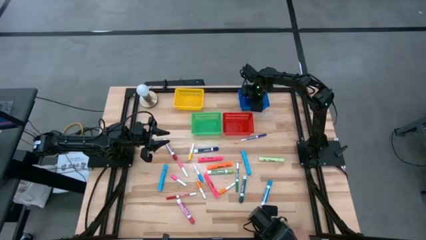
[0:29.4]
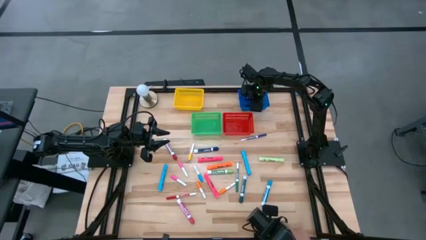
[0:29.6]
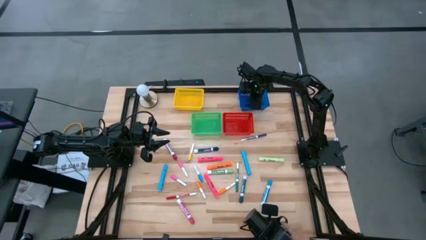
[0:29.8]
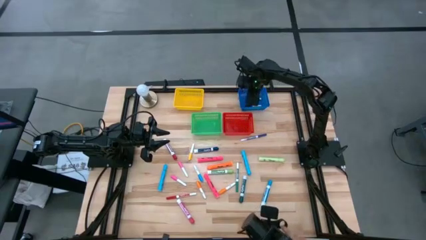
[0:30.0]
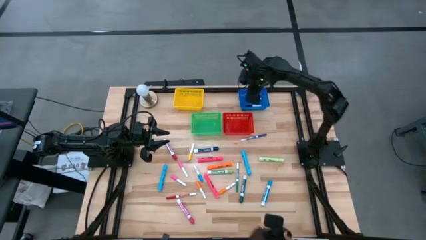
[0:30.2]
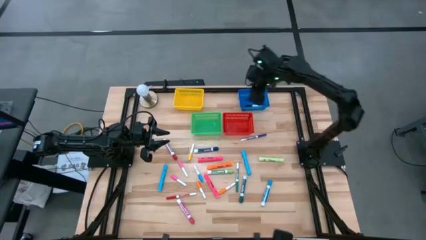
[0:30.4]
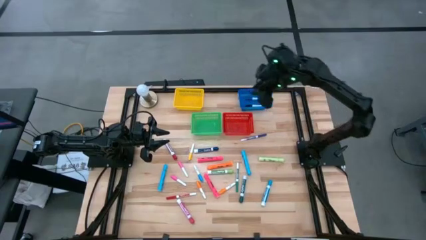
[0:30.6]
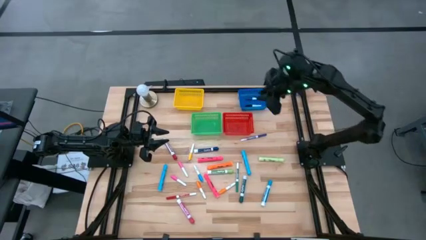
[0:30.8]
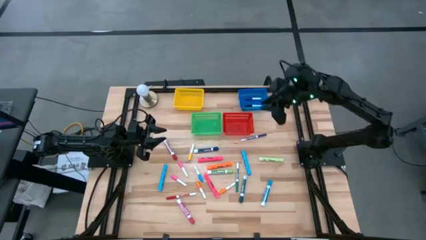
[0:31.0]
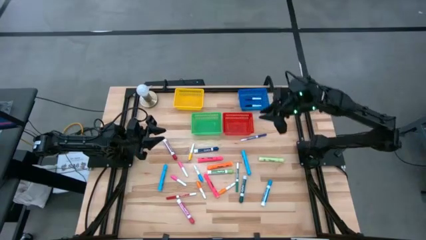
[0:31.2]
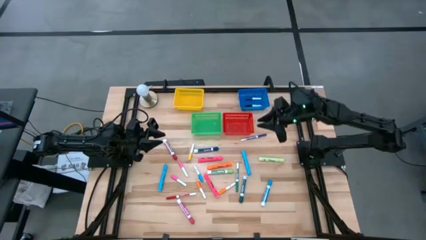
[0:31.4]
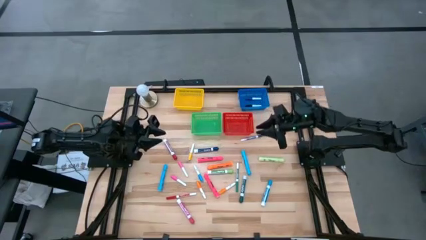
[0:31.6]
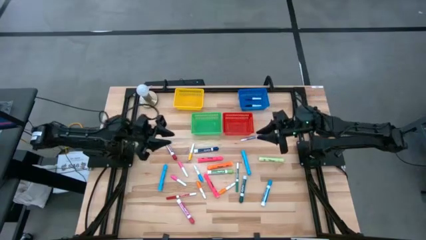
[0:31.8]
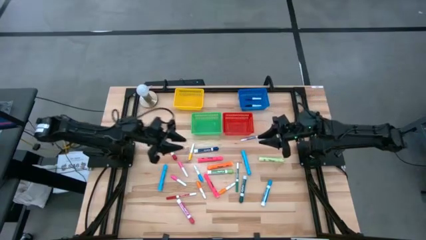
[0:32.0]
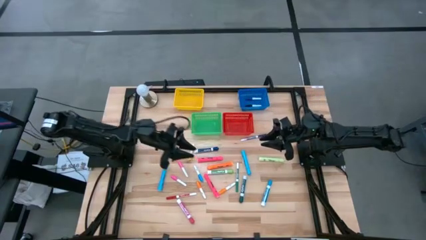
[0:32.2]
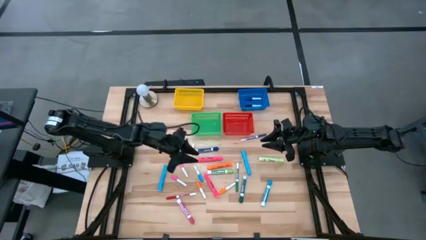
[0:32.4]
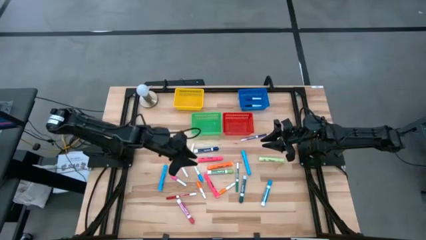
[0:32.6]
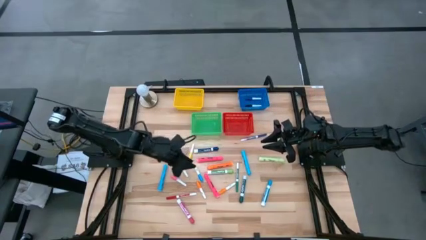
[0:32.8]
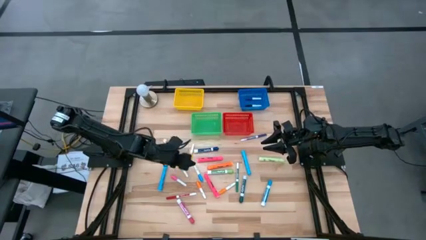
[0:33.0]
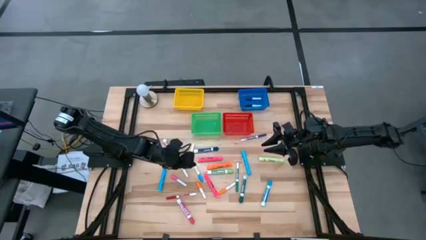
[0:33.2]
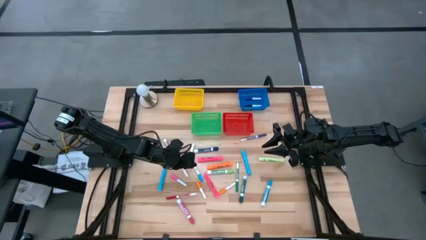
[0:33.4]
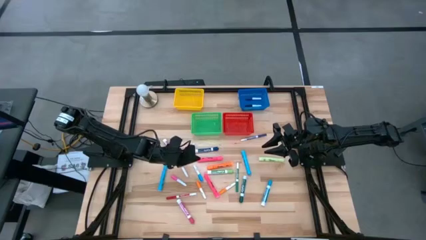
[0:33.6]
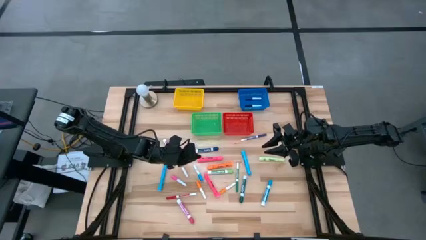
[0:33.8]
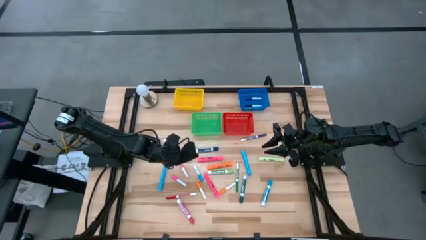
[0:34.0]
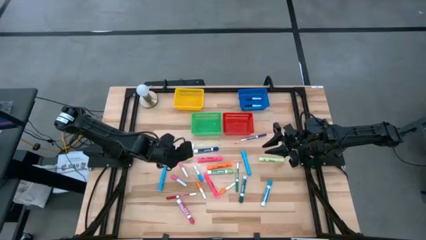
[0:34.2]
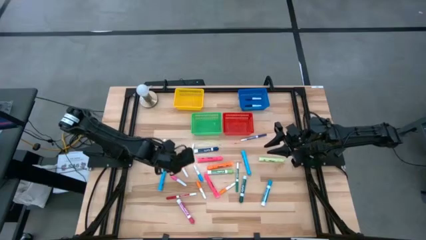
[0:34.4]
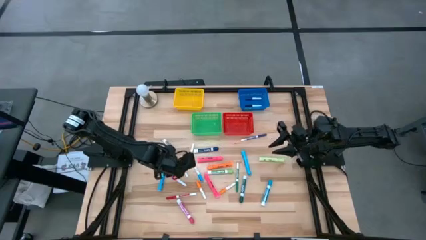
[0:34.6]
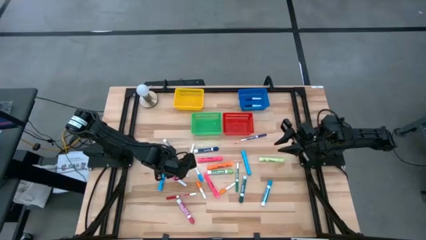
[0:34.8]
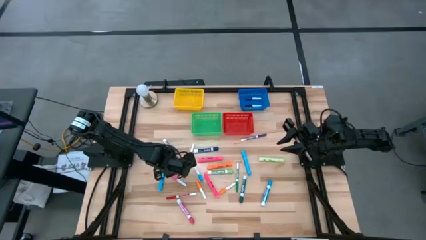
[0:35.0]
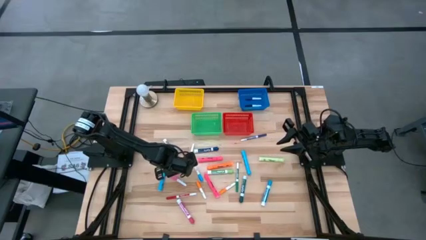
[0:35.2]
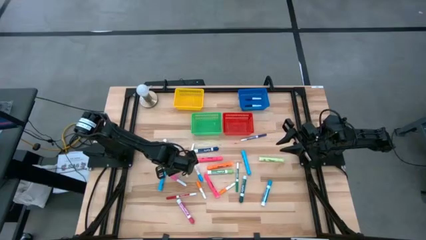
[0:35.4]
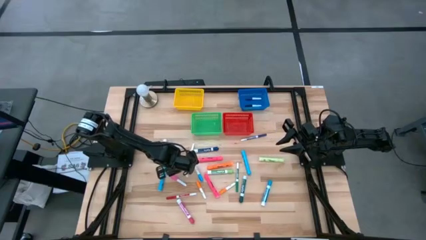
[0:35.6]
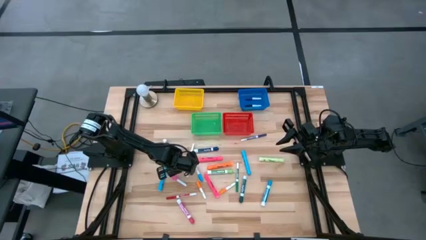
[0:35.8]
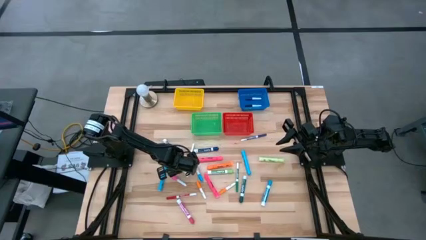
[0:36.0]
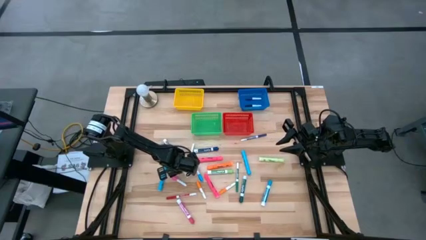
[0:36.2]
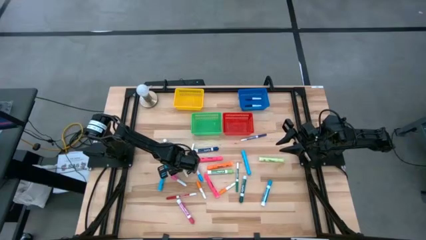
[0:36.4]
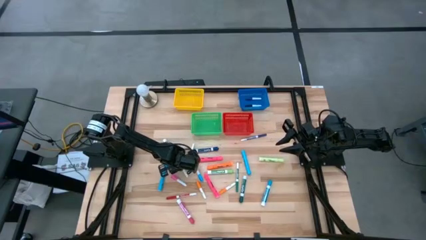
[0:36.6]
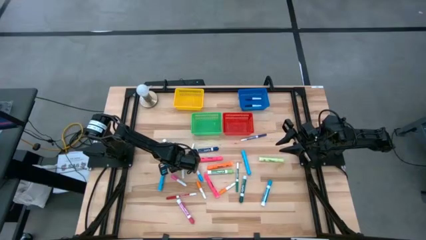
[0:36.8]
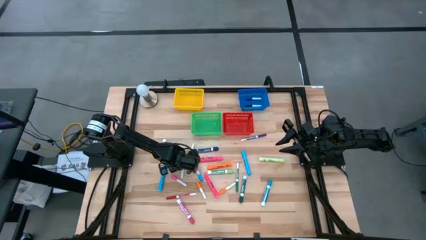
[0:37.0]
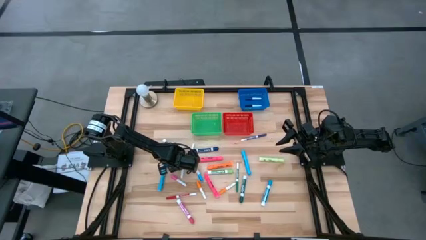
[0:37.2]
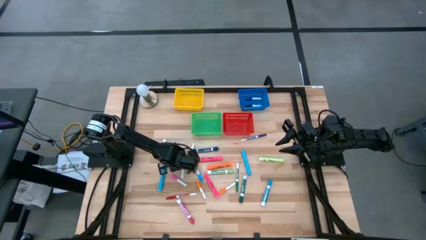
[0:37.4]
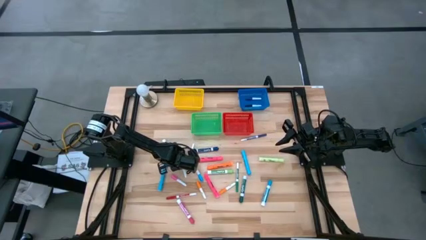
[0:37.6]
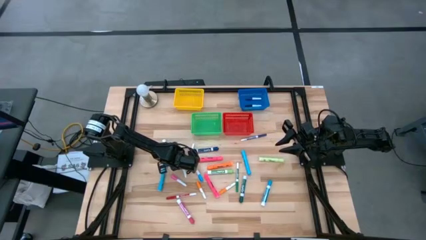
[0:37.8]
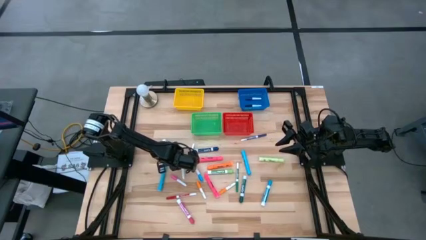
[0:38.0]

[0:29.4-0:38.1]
Task: Pick & Place Markers
Put the pink highlighter into the blue bin

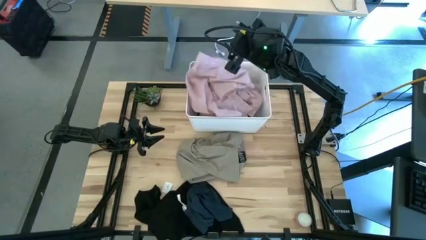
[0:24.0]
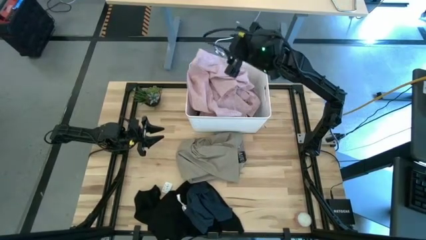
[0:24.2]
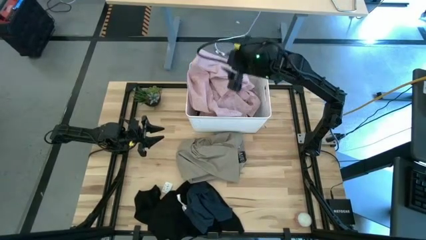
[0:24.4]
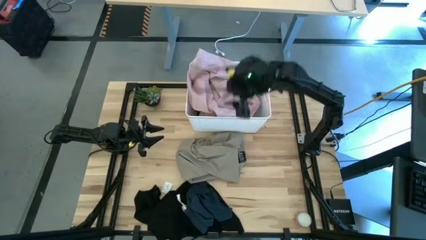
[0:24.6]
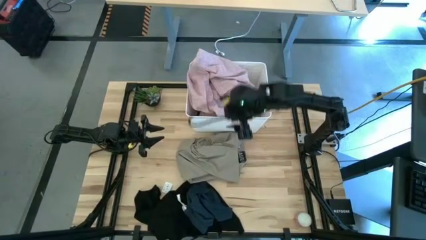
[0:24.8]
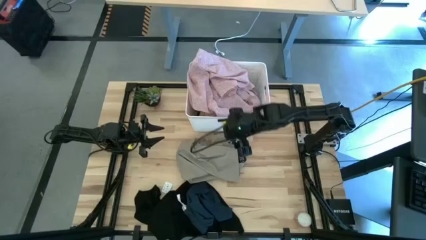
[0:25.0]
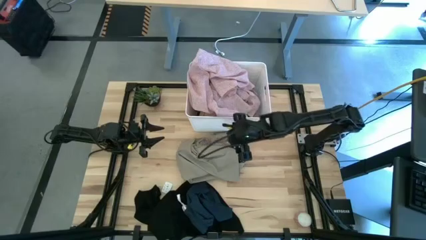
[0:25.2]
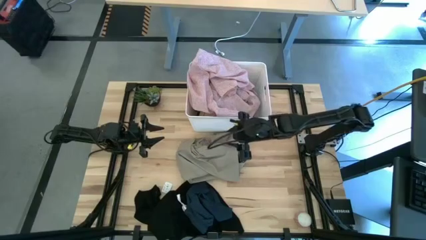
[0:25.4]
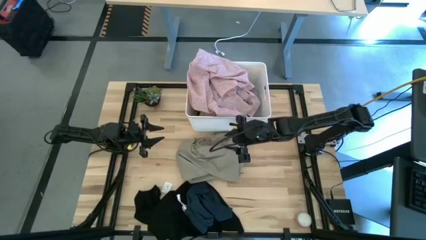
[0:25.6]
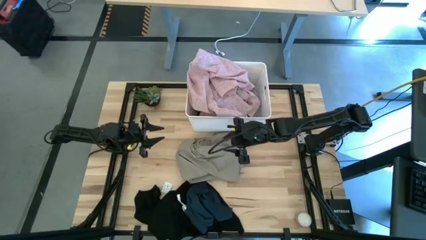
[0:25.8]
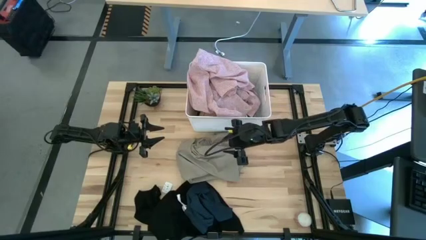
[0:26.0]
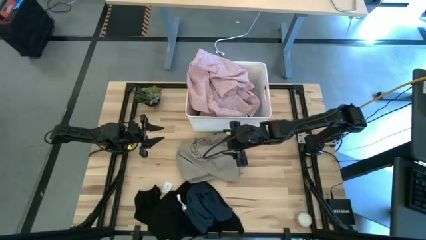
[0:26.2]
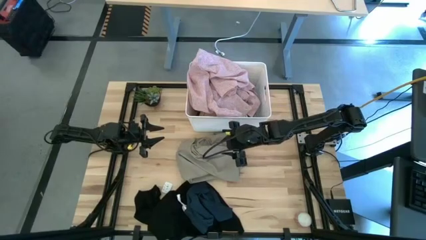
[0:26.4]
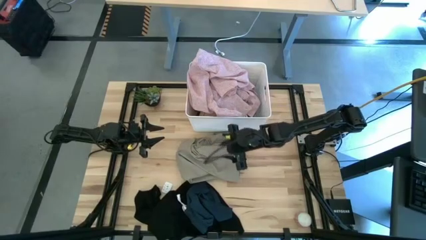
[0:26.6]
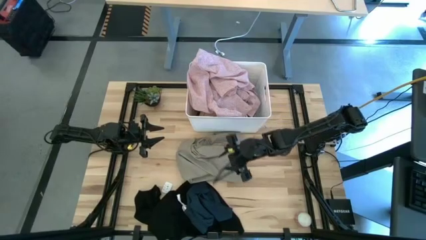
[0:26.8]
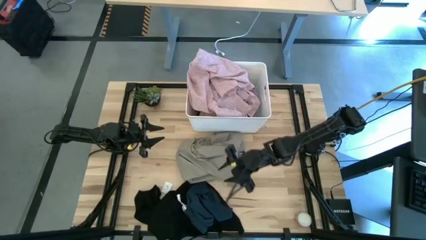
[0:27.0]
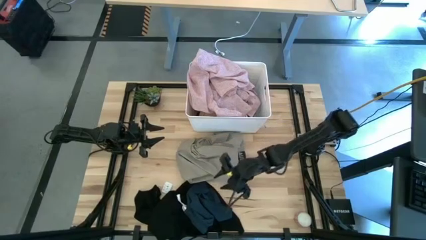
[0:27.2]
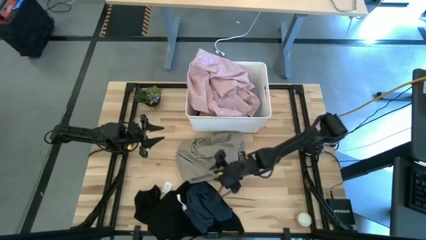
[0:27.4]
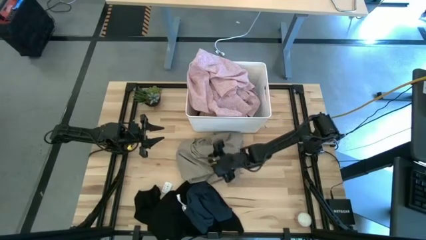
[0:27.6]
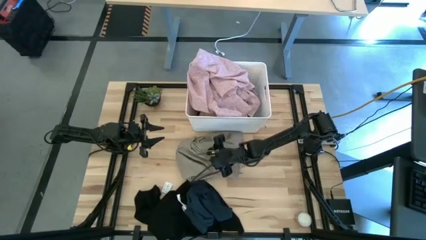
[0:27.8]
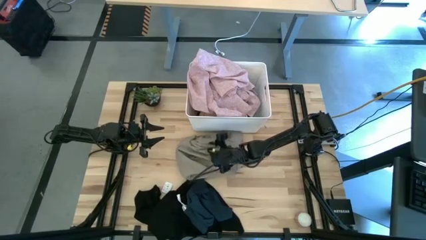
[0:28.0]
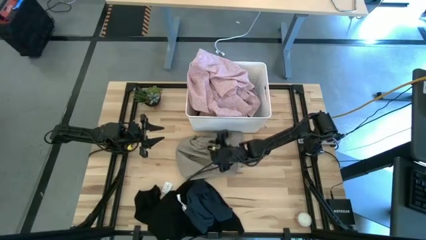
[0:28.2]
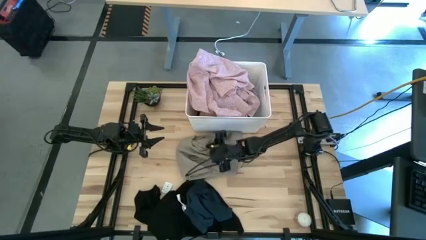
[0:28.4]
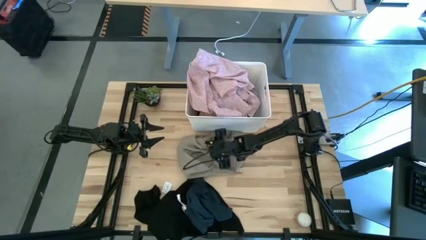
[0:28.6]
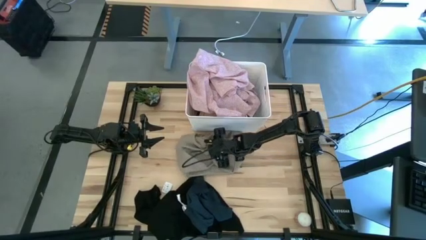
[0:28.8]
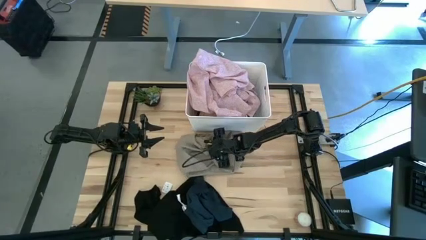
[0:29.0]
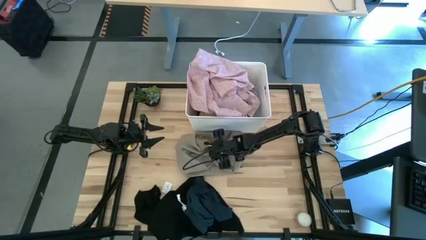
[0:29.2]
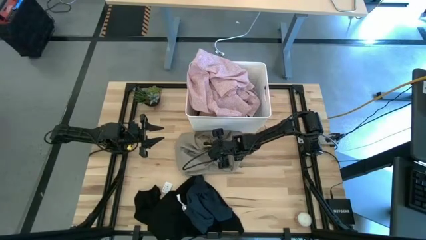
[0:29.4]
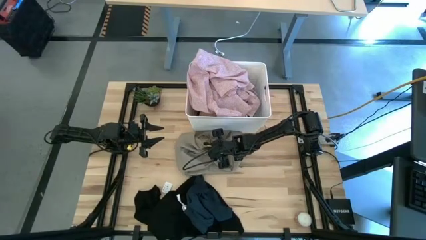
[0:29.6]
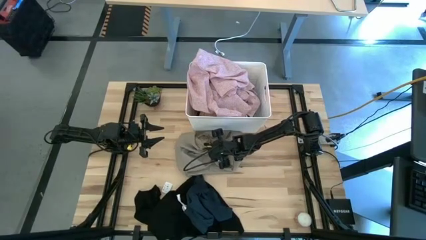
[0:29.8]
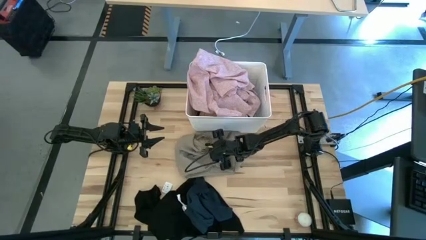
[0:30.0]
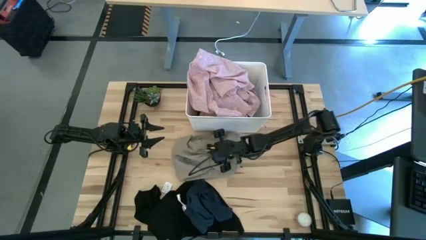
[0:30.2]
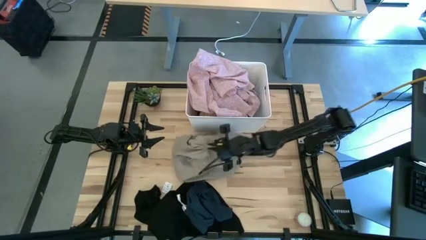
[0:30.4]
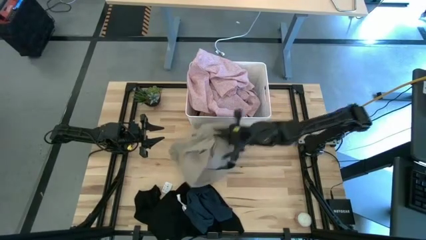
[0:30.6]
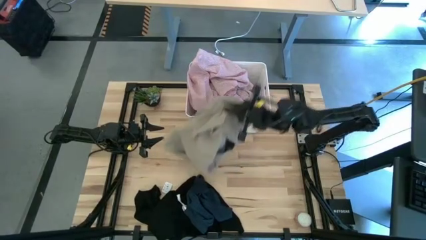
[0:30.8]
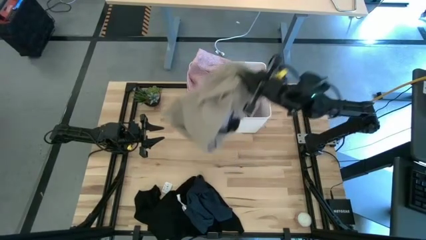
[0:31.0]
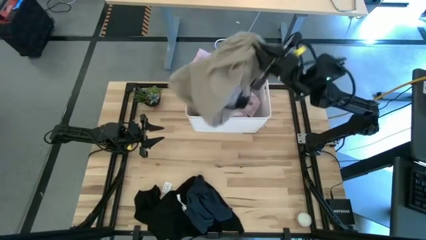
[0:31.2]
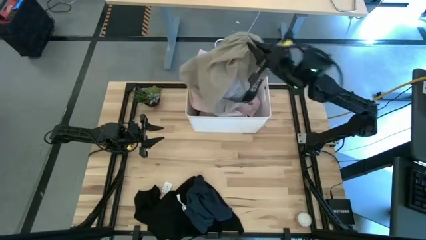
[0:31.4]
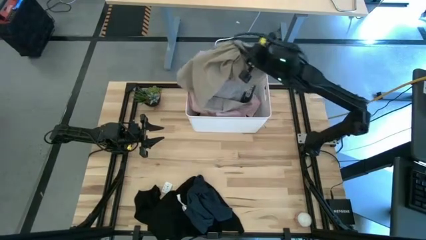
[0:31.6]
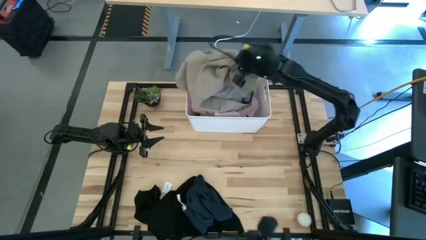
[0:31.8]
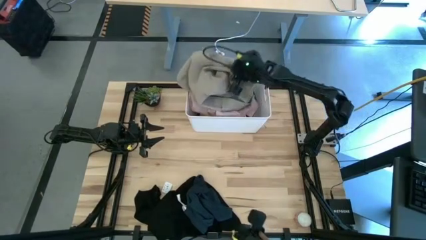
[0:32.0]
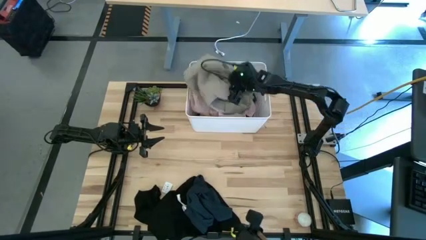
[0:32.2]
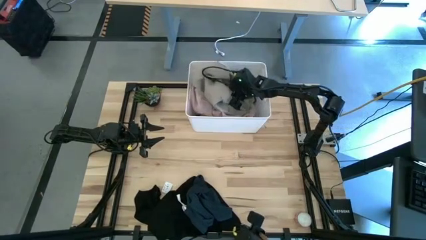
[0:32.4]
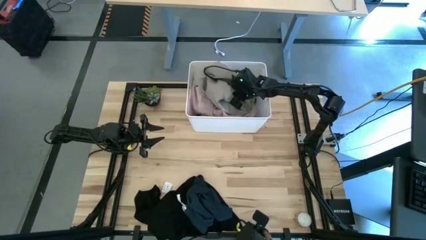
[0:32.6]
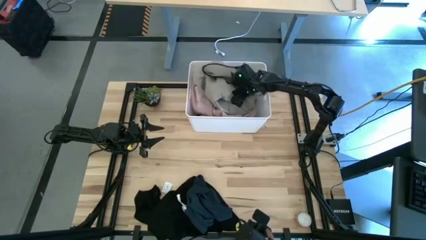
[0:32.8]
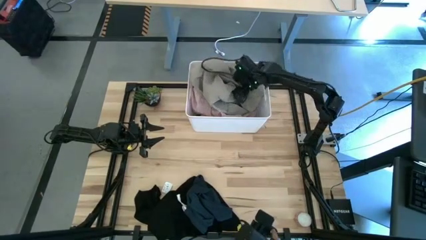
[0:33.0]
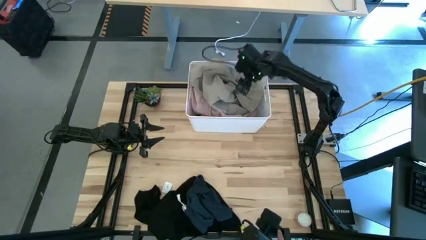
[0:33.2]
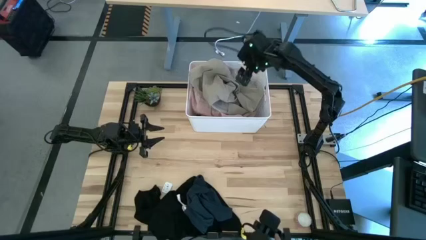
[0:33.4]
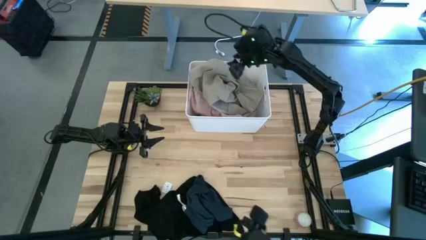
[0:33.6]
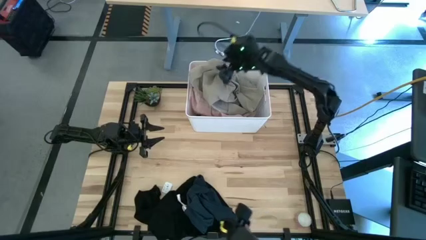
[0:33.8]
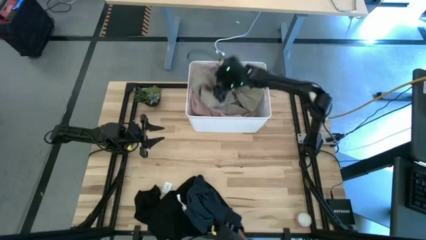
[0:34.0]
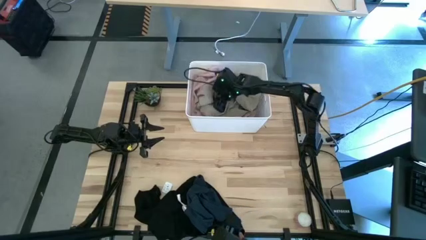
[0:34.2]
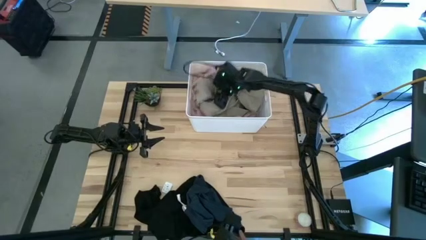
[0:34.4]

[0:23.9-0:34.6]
Task: Sort clothes
Put the gray shorts into the white laundry bin
